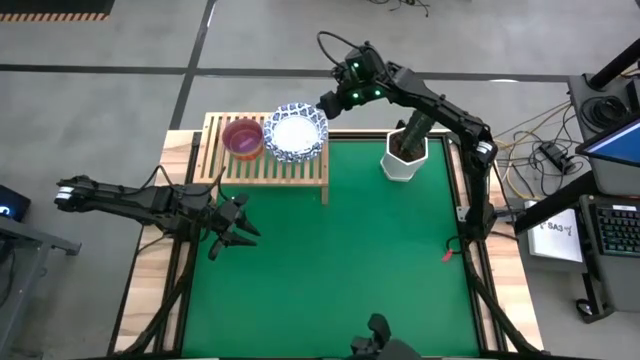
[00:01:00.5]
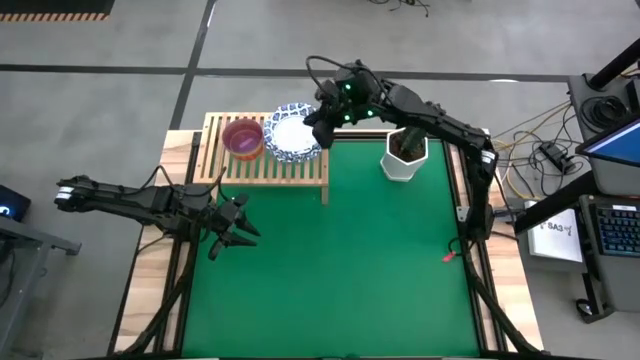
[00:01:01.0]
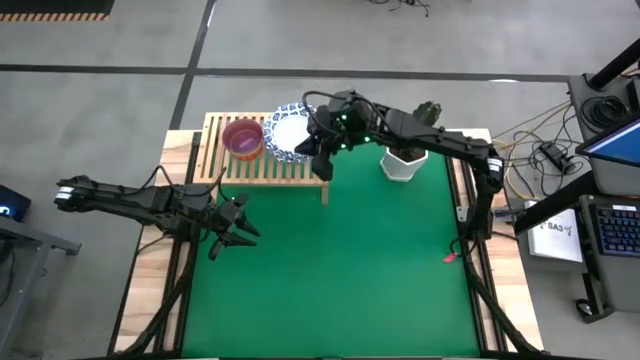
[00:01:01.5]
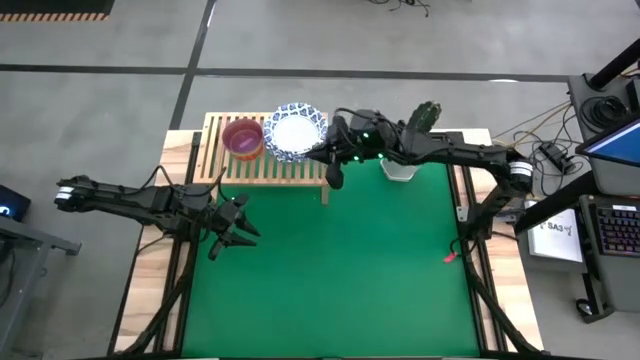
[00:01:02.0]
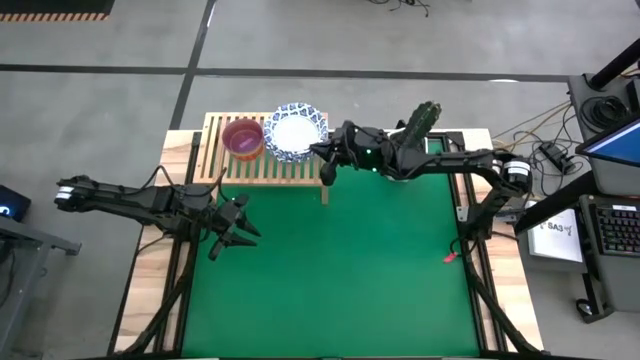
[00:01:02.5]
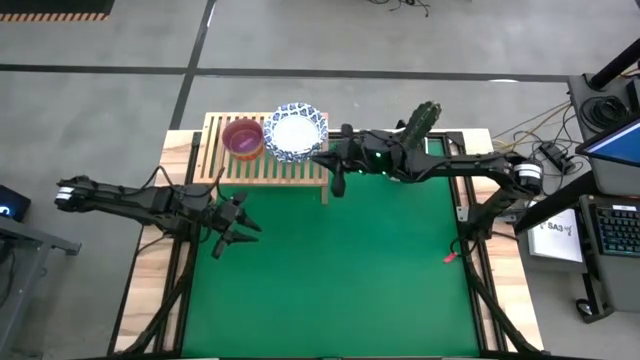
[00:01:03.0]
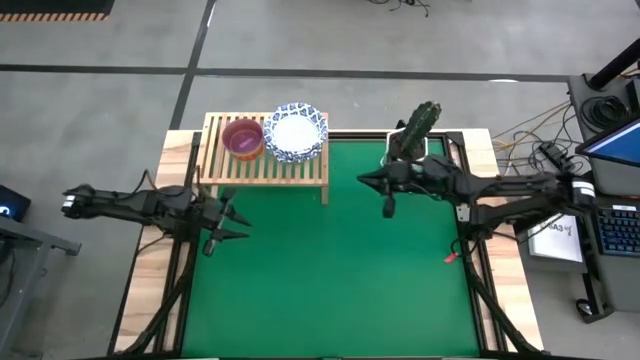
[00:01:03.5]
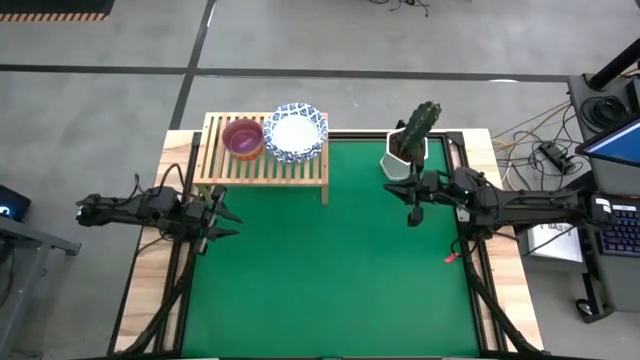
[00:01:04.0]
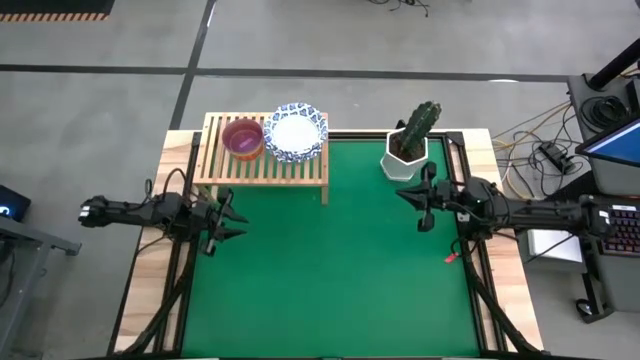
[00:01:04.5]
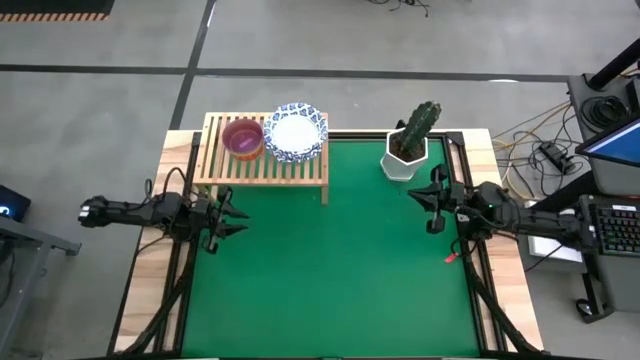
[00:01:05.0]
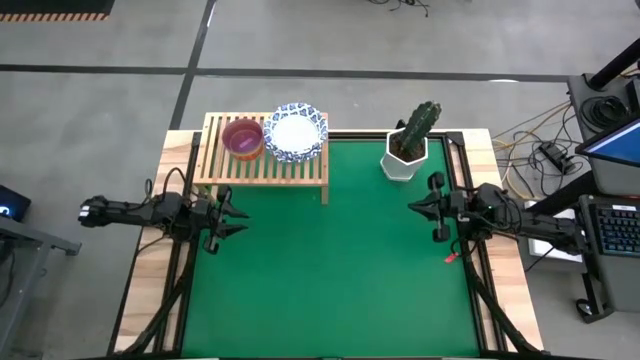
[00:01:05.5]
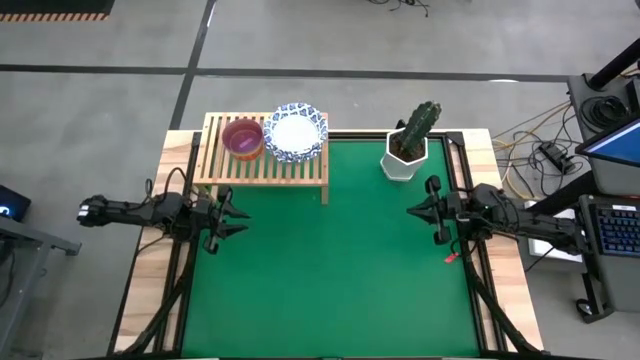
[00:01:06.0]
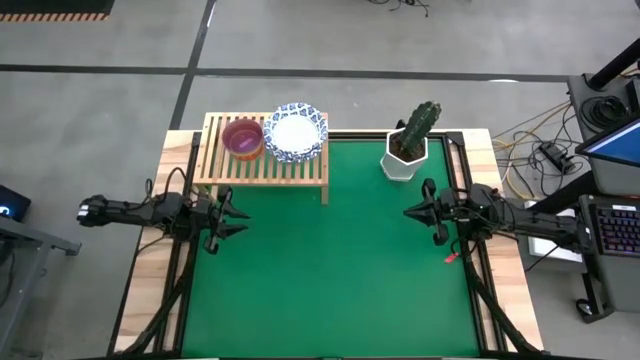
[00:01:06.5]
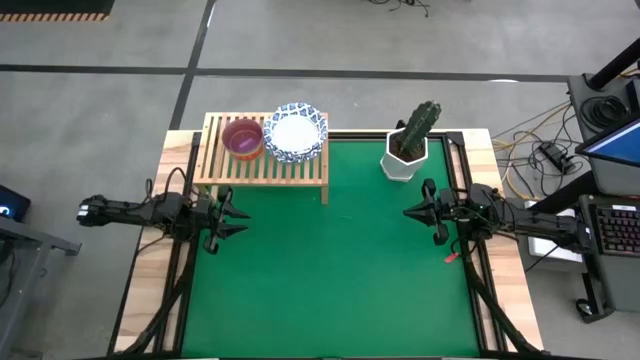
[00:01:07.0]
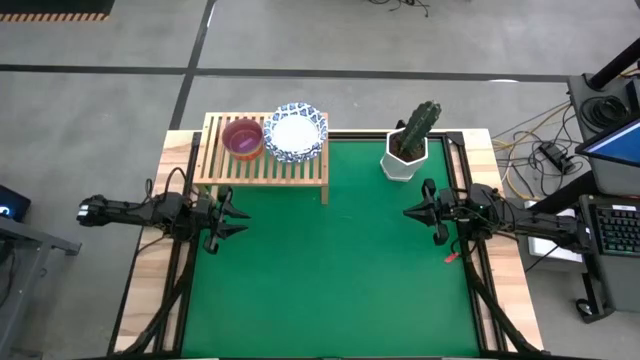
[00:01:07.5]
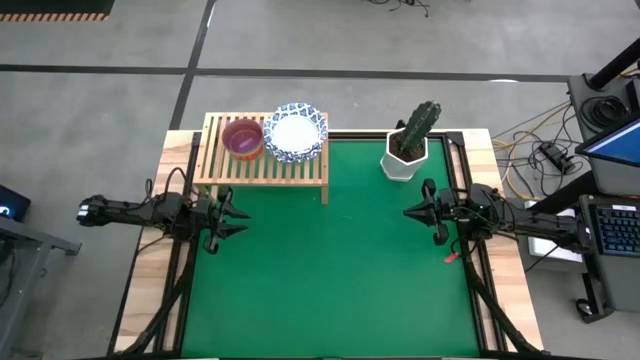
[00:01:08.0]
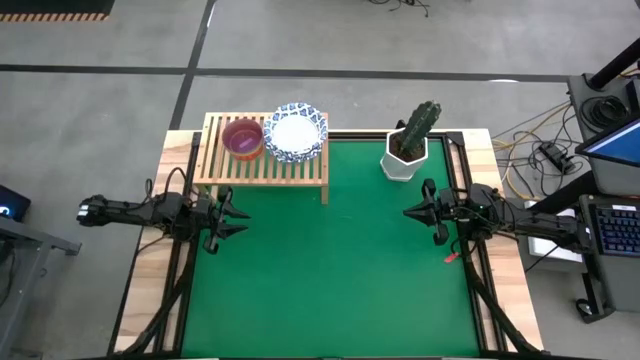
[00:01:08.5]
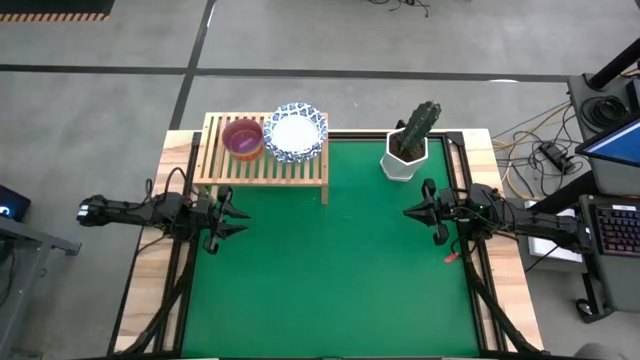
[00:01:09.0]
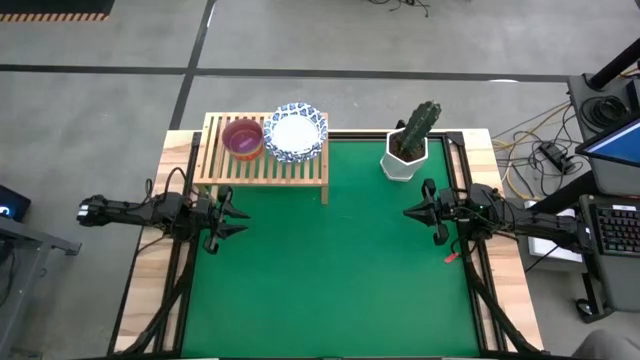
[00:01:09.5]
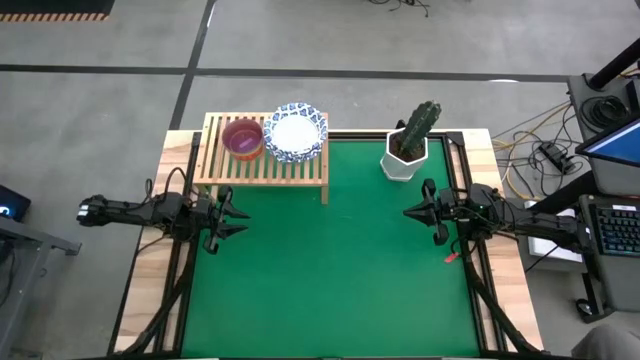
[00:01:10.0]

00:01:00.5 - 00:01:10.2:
Task: Place and stack plates onto a shelf
Return to Home Position

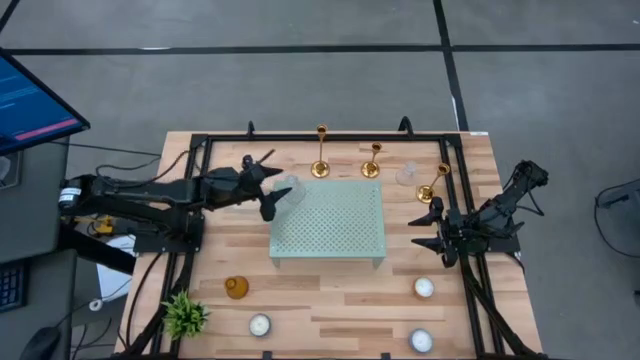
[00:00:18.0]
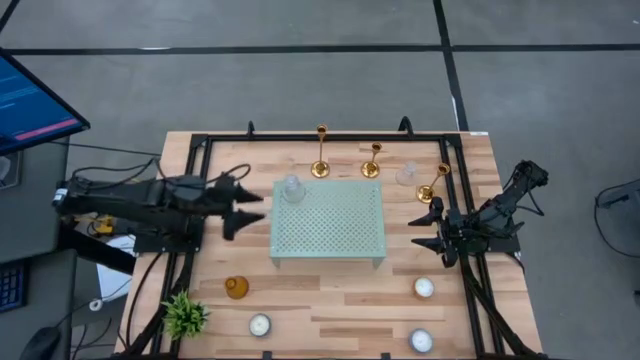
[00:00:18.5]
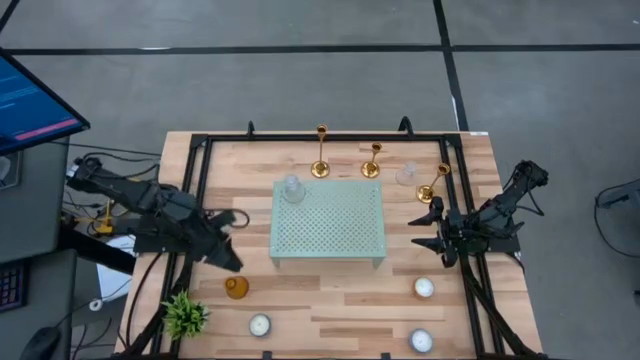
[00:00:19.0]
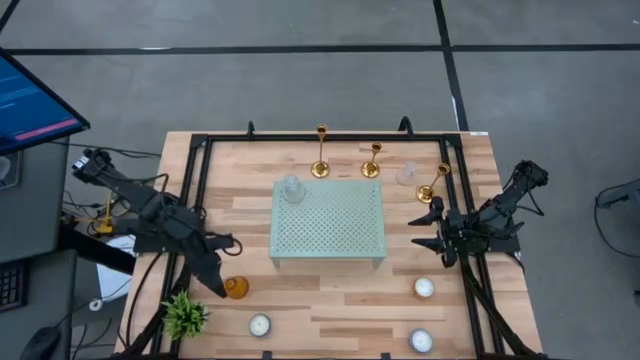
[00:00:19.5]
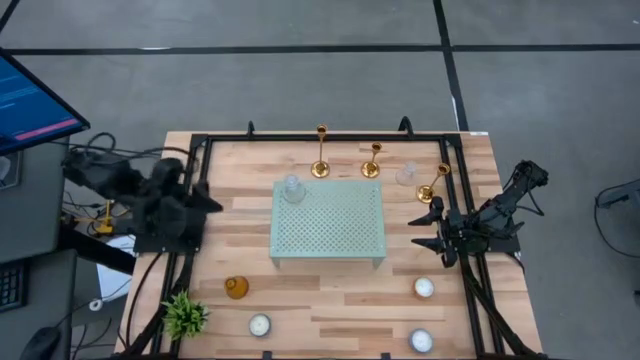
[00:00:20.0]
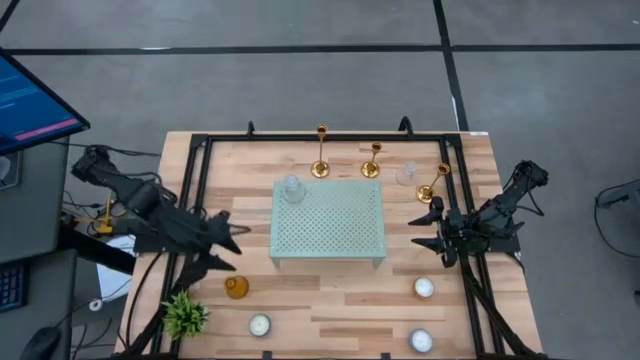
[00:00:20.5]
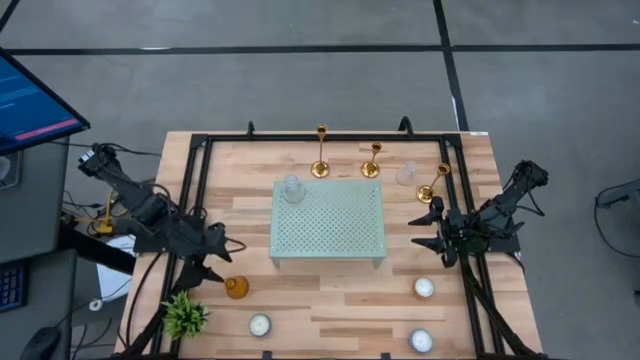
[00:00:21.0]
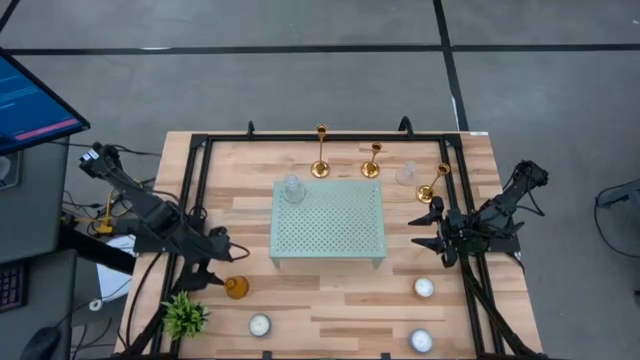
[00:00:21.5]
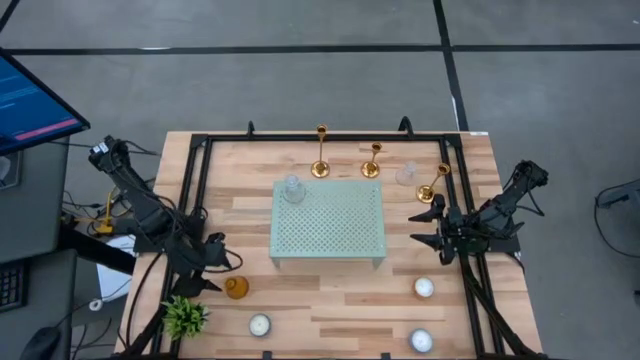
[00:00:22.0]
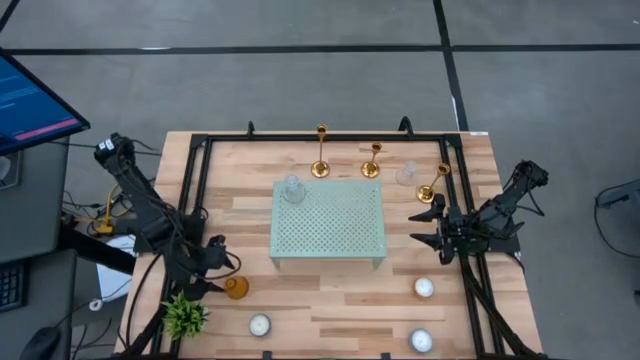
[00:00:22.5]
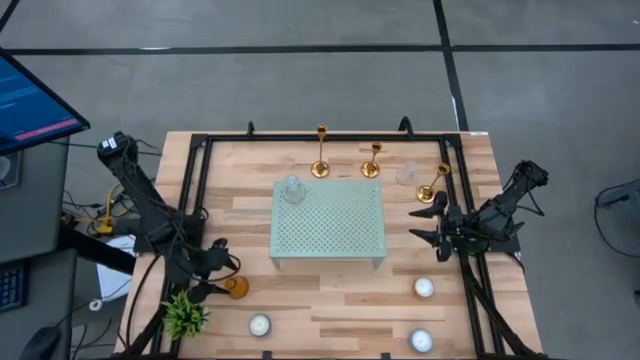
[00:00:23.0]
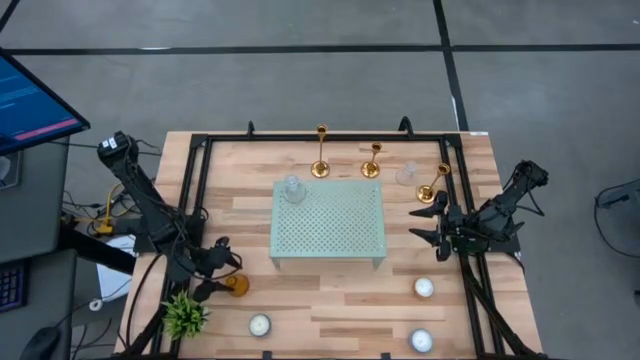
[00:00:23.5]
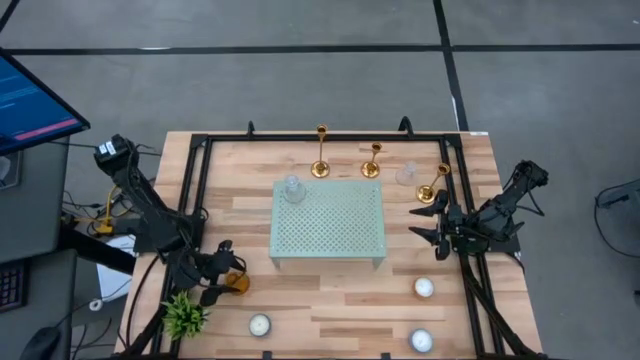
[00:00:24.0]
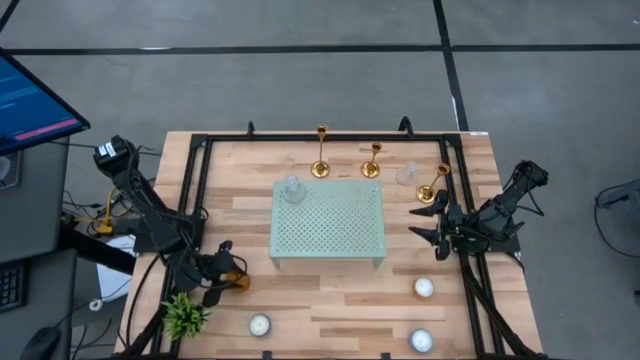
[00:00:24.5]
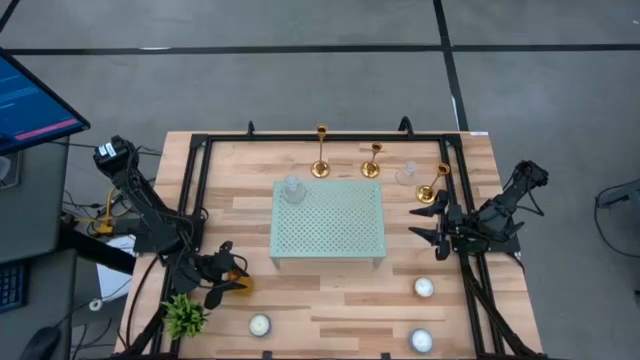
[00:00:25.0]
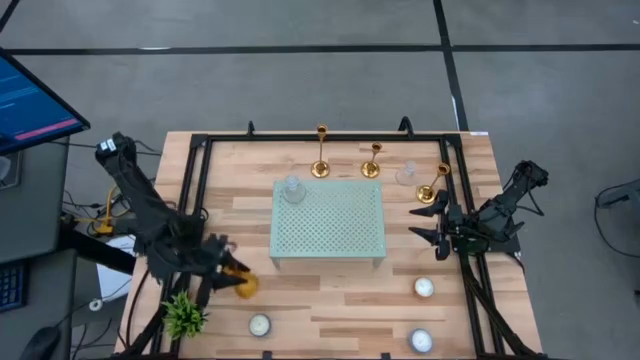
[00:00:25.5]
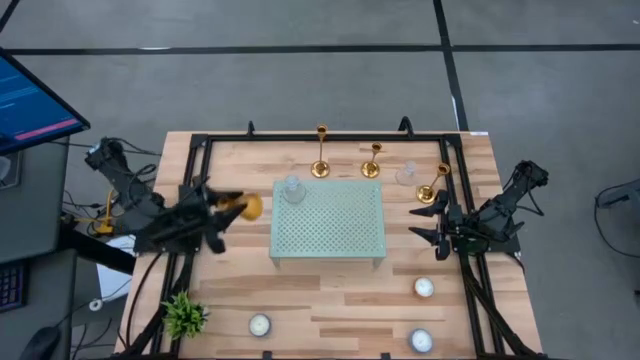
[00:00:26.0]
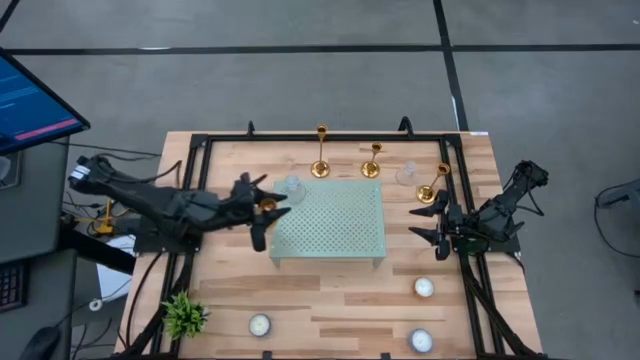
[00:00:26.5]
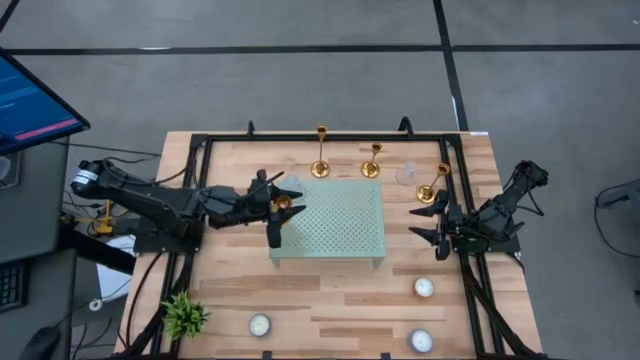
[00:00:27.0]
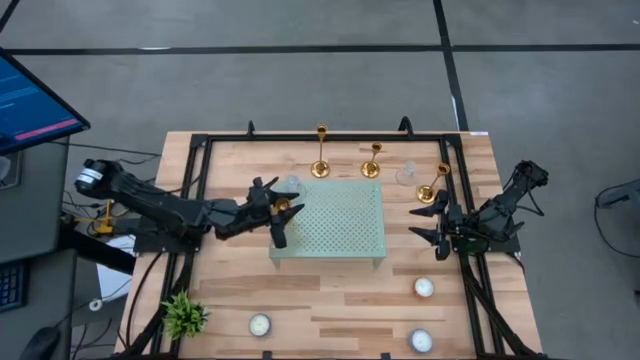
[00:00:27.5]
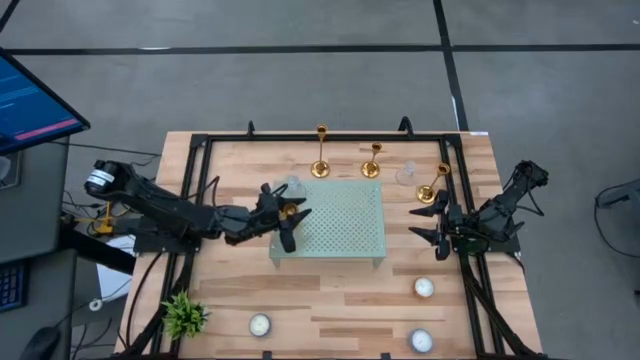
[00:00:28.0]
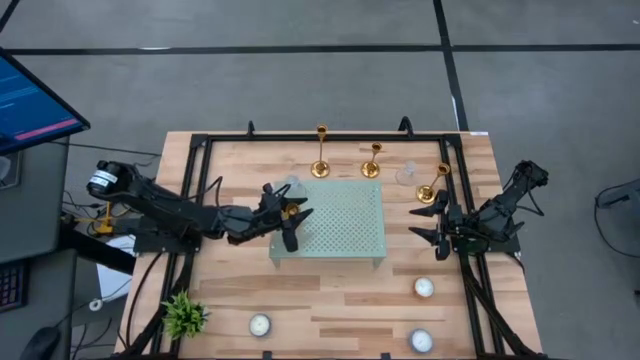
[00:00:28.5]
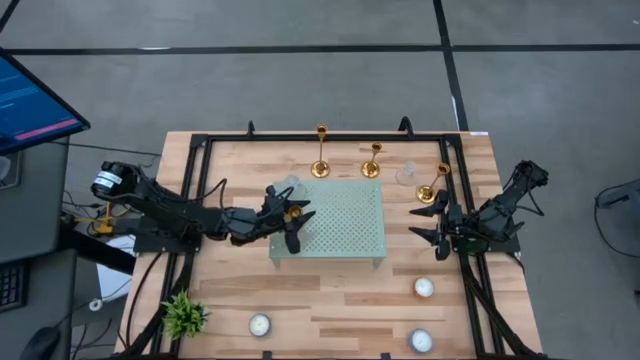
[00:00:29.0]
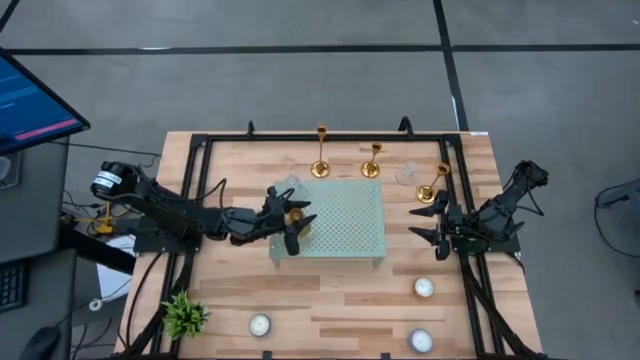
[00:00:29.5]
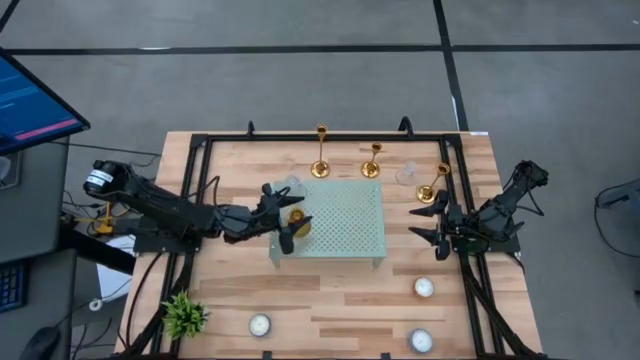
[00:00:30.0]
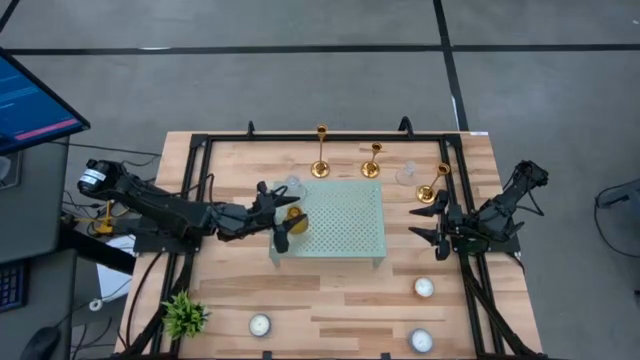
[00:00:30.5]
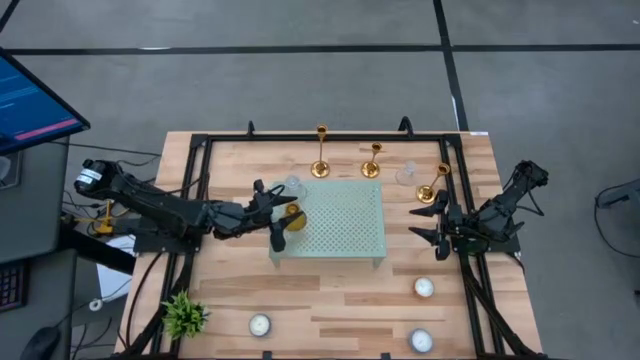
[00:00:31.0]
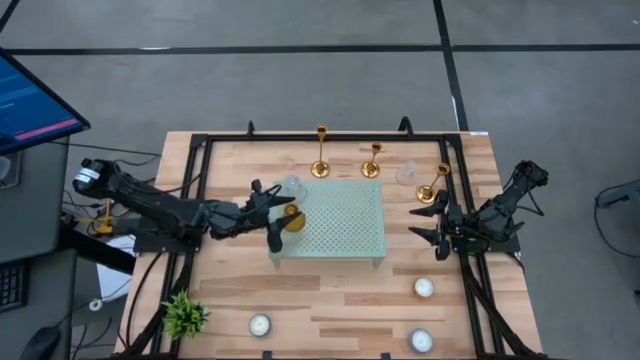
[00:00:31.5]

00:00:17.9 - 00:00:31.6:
Task: Pick & Place candle stick holders
Put the yellow glass candle holder on the shelf
